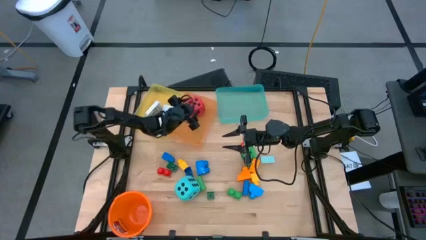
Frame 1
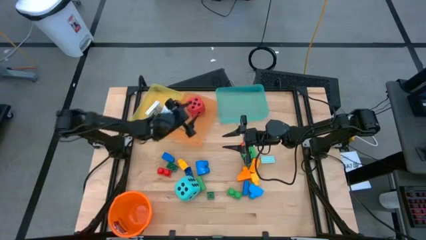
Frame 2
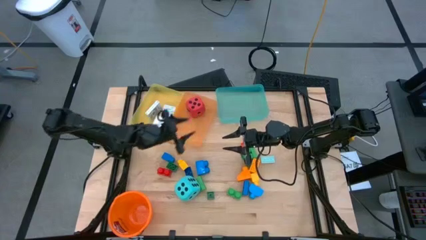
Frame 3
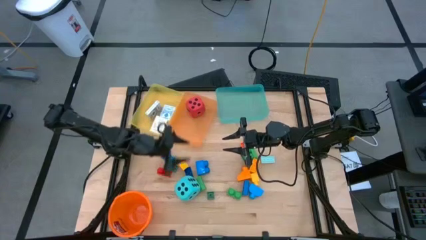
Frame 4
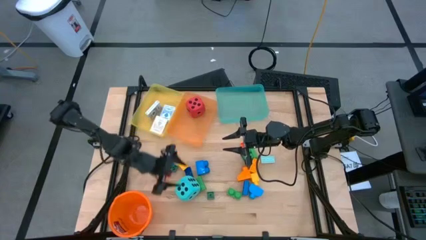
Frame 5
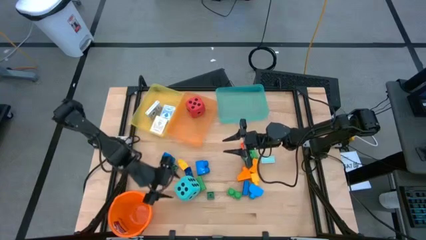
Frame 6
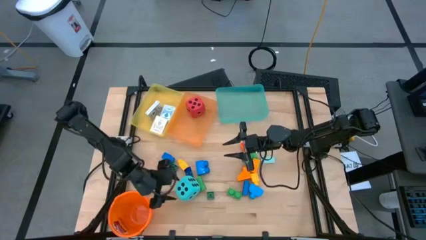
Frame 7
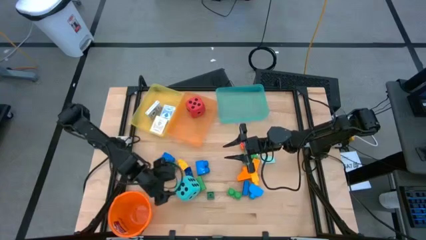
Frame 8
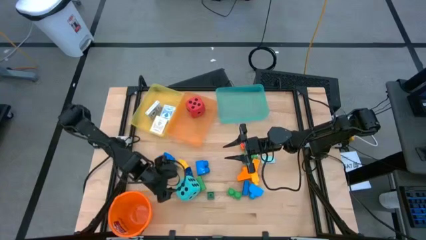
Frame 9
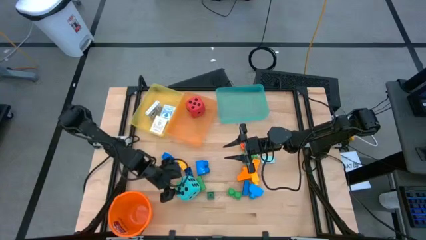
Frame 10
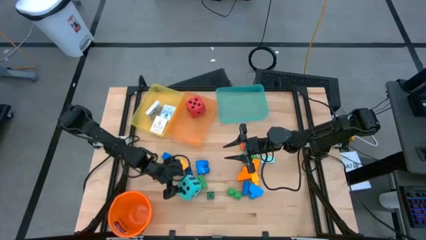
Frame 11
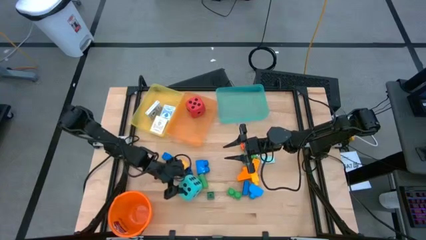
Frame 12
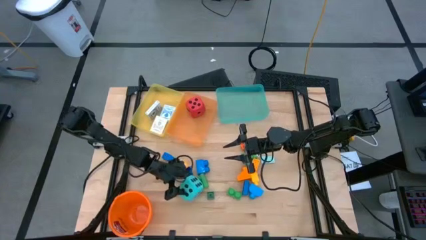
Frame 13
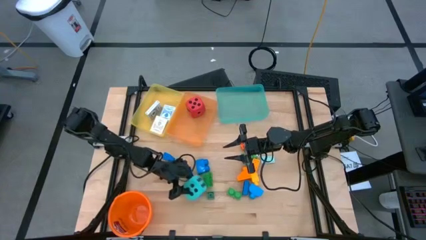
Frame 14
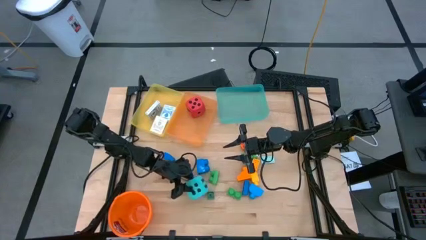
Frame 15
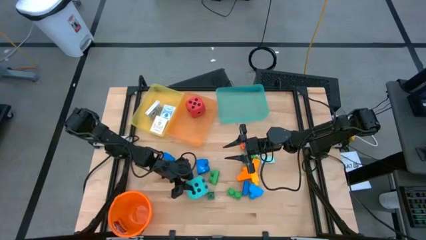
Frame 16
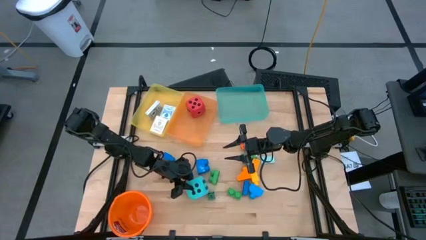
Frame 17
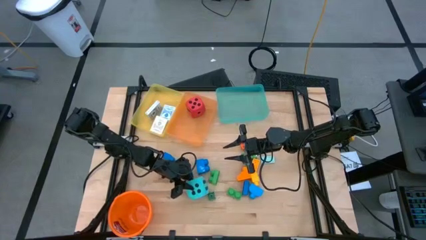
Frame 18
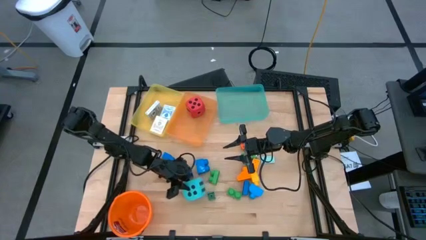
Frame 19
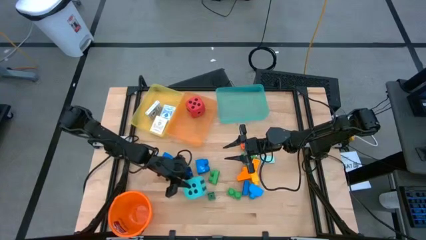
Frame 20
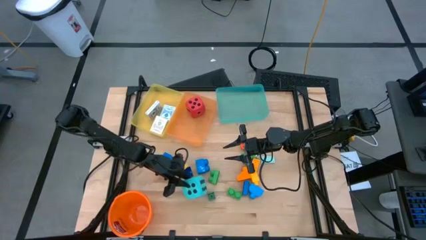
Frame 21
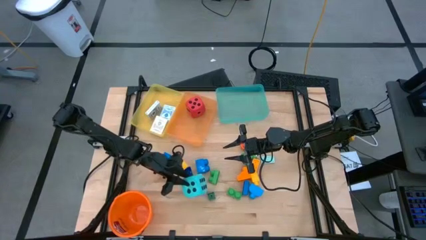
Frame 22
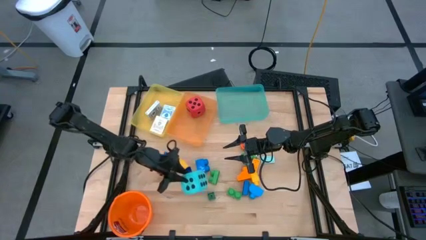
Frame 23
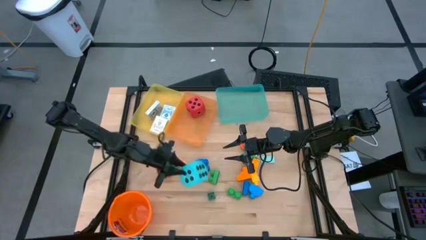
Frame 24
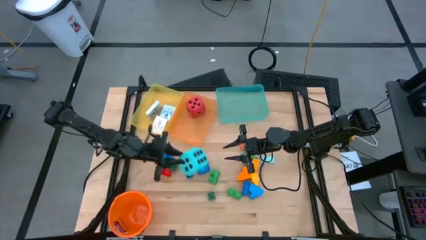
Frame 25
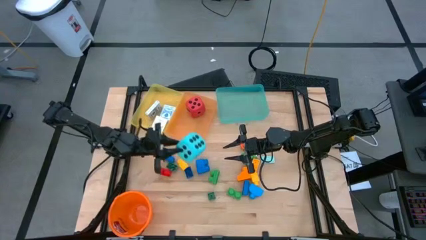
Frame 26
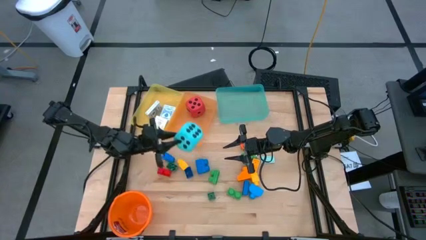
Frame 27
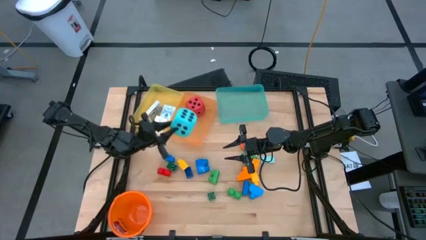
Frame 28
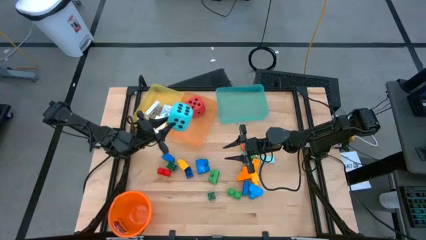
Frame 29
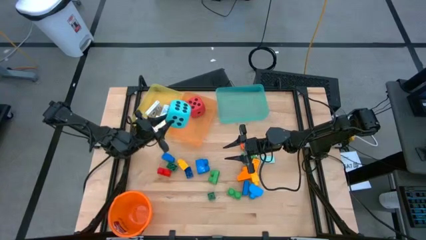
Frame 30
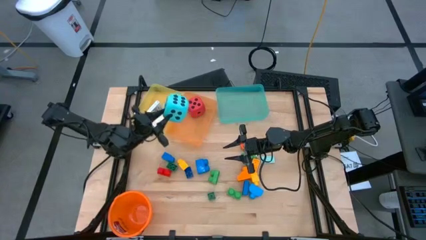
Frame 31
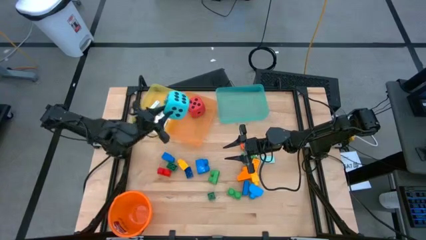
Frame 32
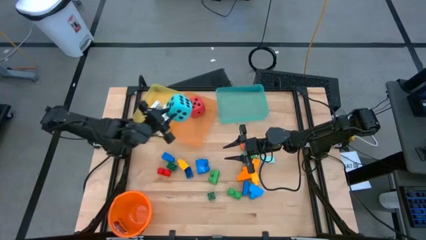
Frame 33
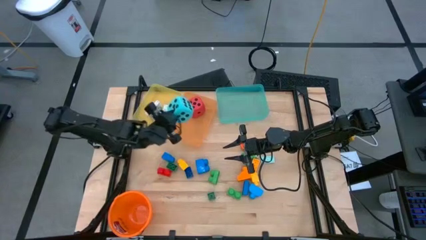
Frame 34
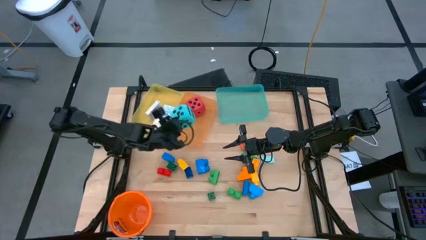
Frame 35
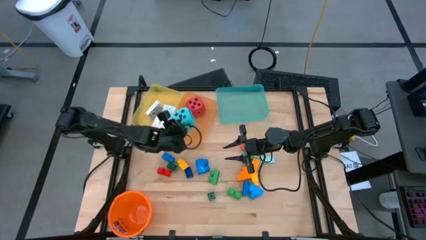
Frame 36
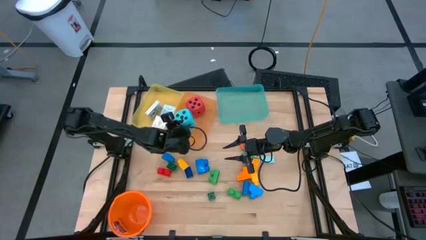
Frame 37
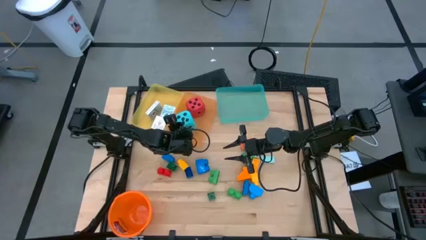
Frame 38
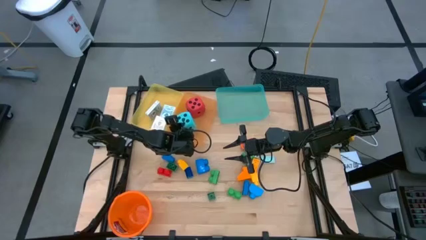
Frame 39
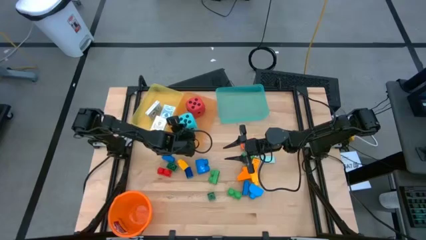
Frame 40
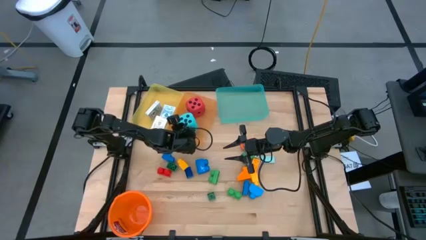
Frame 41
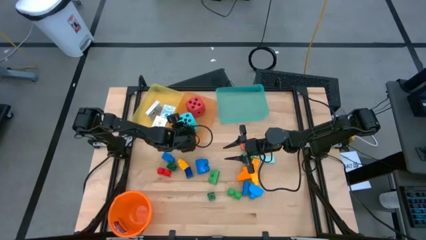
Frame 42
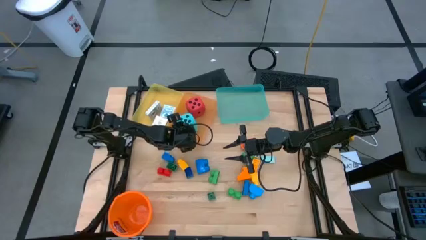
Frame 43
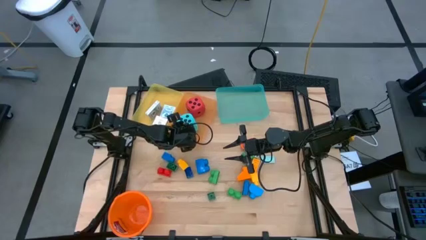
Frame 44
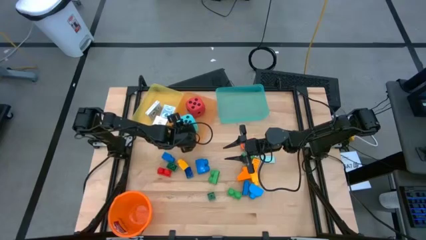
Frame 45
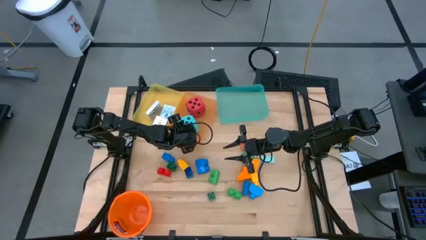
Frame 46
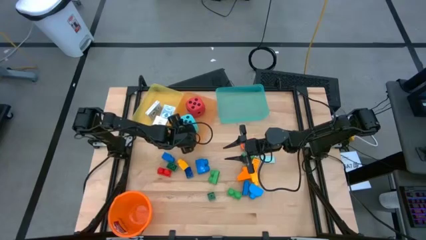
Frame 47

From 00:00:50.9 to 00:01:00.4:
Task: Pick & Place Toys
Put the blue dice into the orange bin

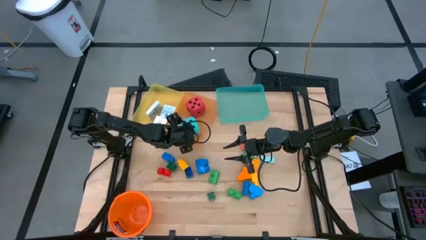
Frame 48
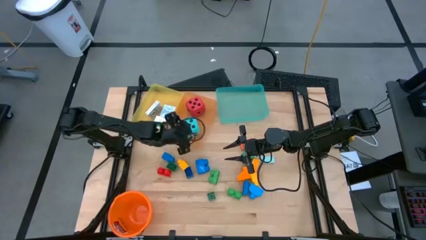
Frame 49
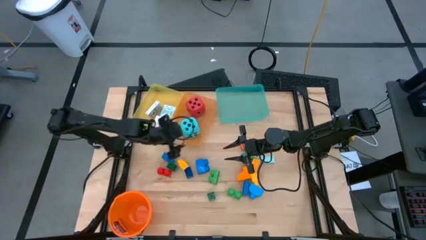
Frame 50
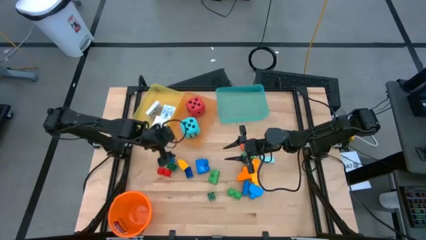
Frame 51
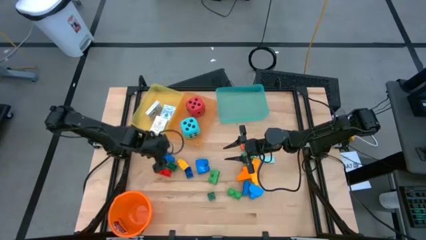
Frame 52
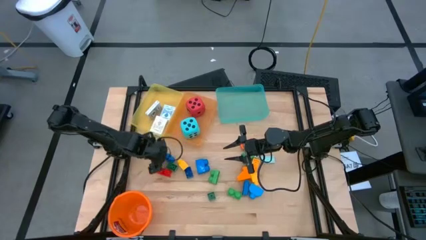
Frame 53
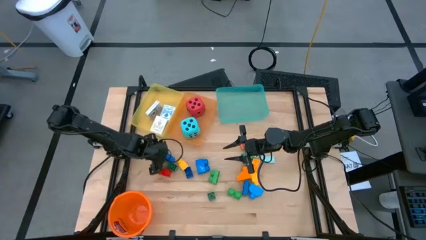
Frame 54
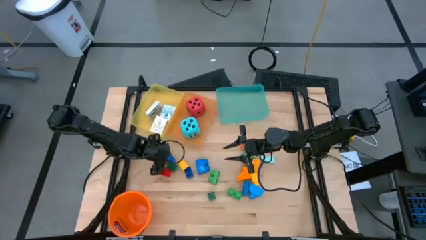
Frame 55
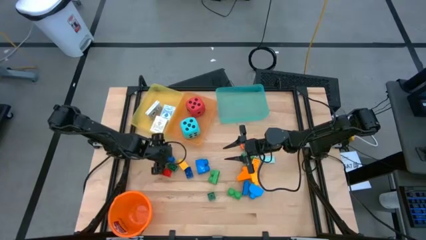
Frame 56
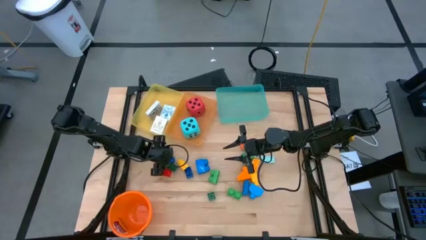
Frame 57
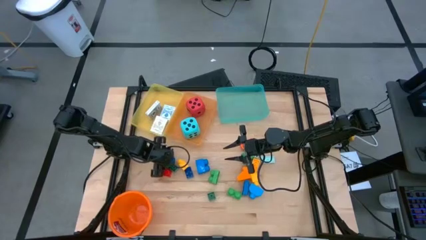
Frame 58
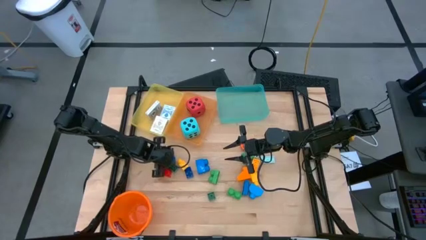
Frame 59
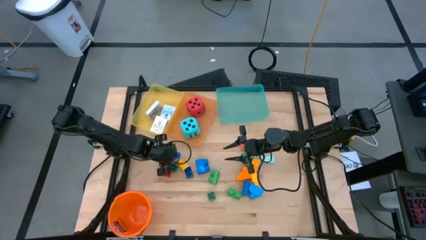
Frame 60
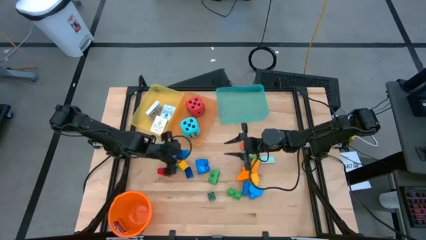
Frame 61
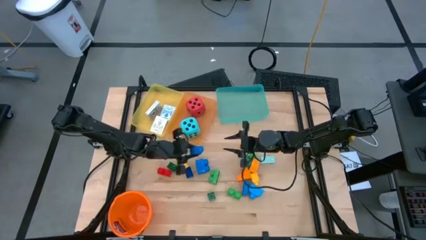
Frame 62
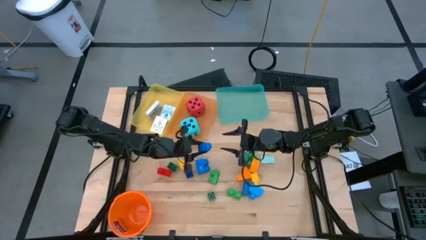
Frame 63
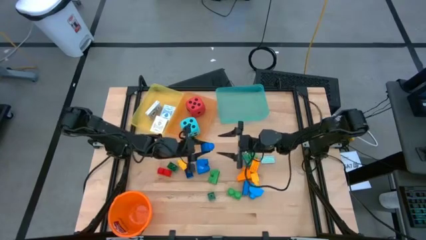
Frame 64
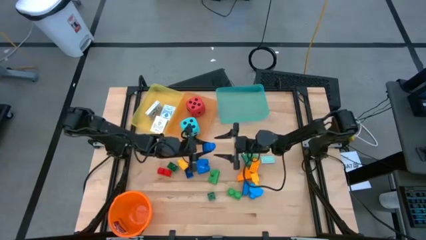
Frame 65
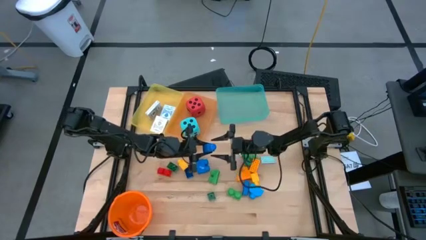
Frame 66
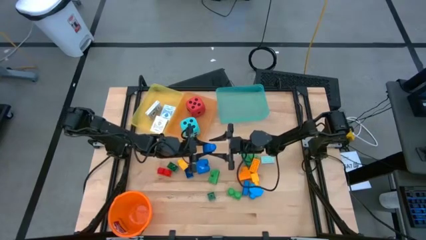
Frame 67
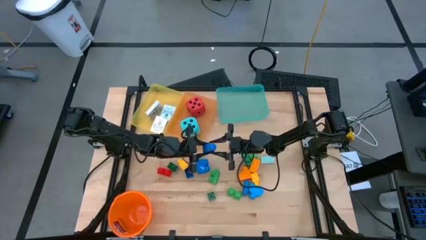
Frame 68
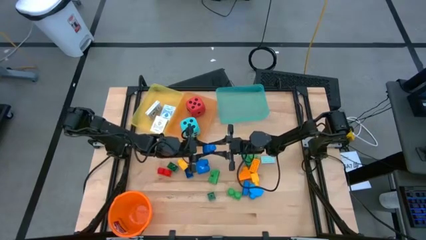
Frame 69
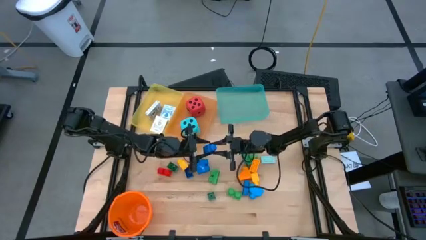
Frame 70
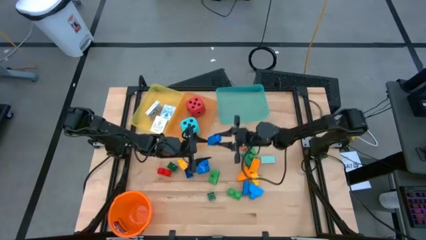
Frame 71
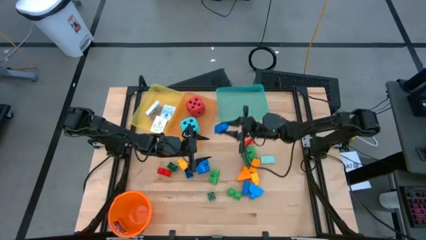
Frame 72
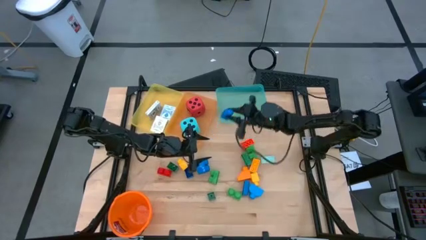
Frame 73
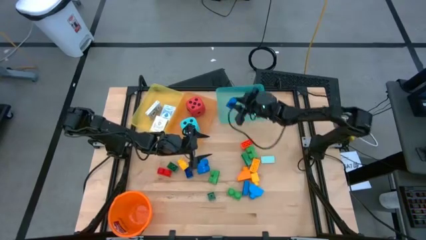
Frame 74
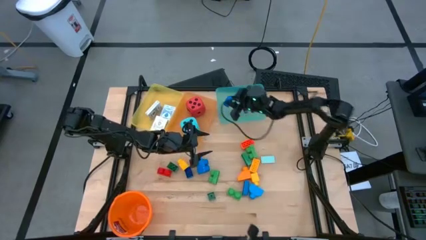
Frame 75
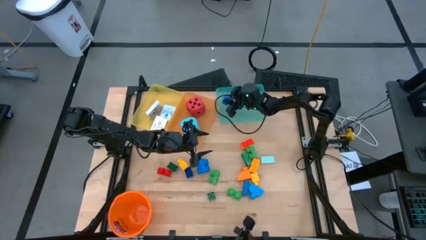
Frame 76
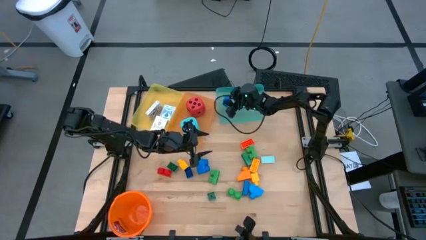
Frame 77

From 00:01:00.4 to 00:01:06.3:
Put the blue game piece into the blue bin
